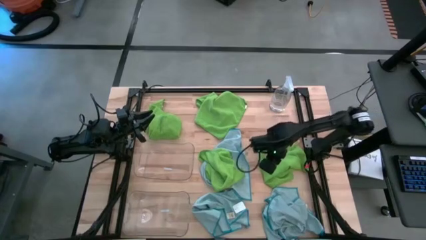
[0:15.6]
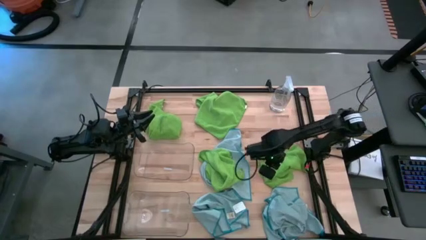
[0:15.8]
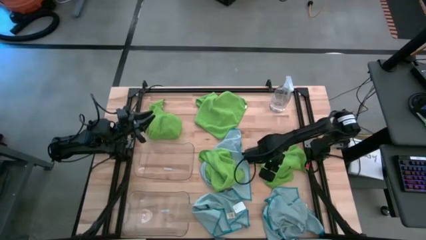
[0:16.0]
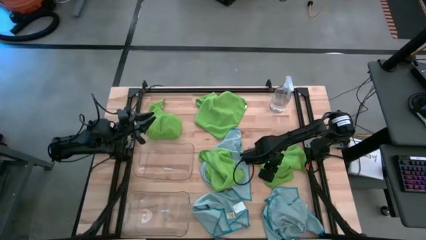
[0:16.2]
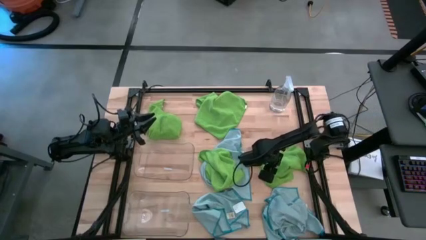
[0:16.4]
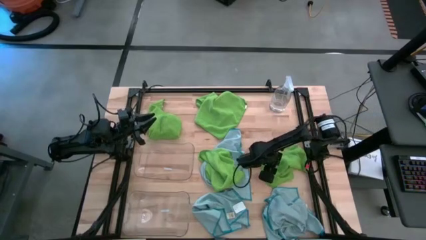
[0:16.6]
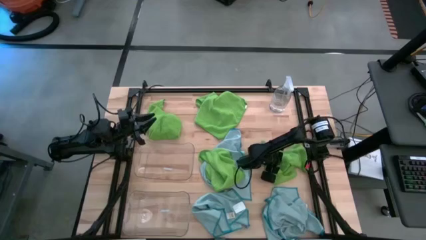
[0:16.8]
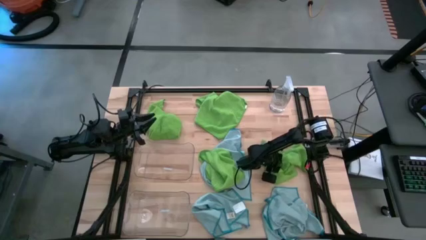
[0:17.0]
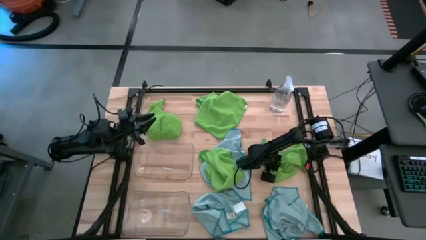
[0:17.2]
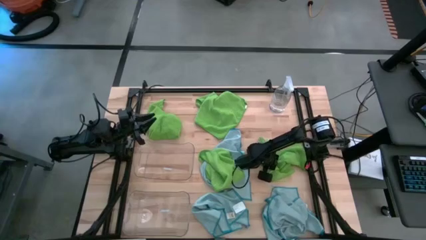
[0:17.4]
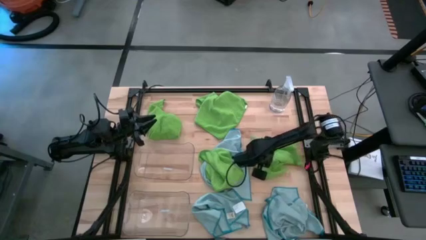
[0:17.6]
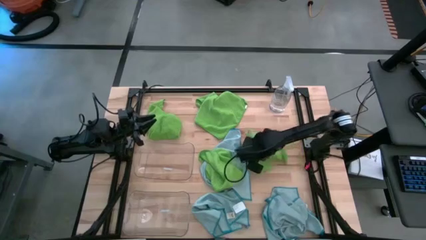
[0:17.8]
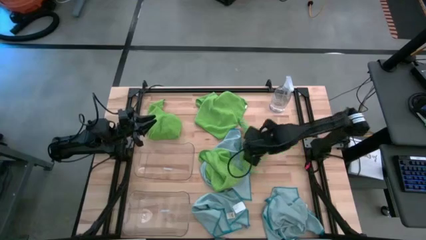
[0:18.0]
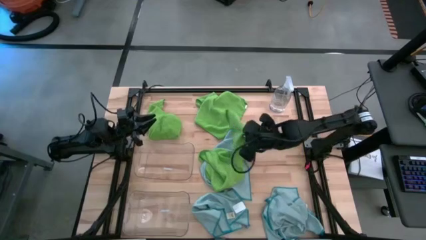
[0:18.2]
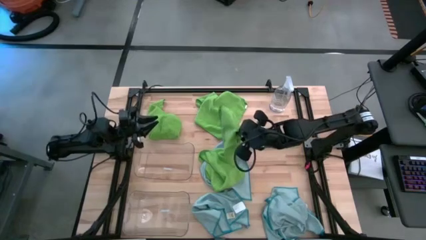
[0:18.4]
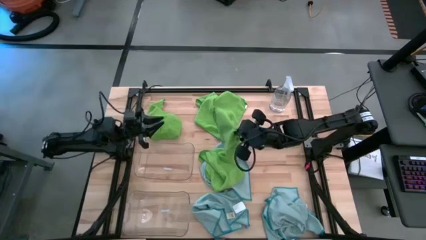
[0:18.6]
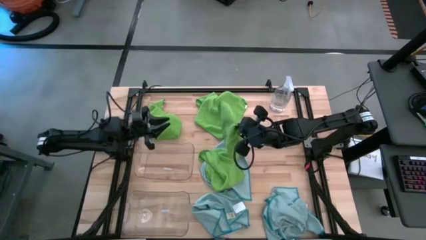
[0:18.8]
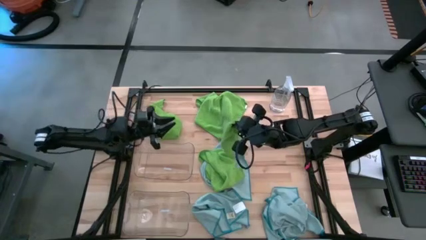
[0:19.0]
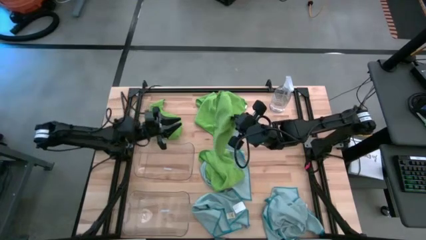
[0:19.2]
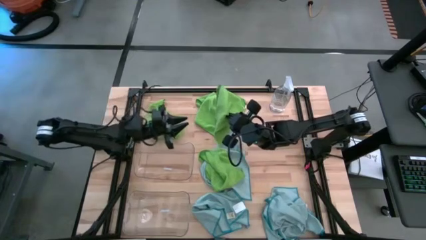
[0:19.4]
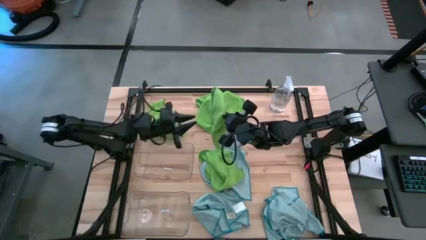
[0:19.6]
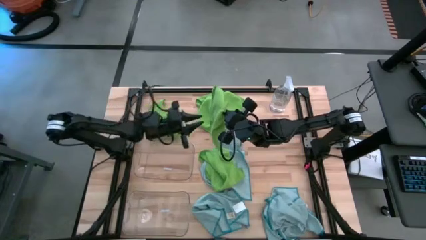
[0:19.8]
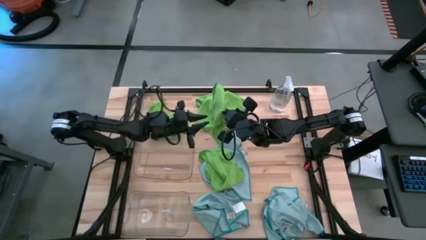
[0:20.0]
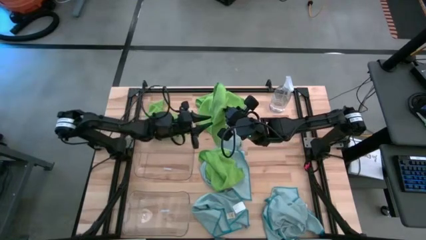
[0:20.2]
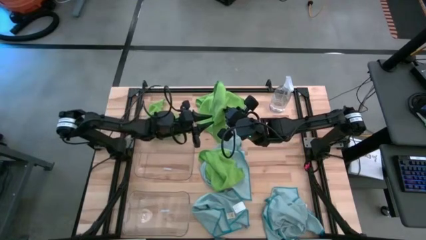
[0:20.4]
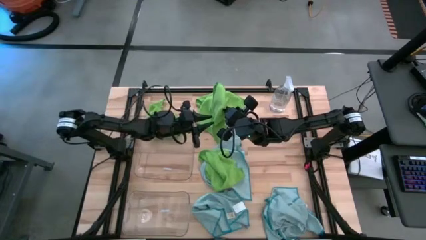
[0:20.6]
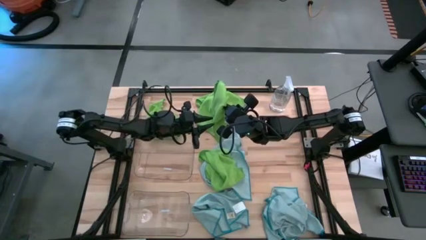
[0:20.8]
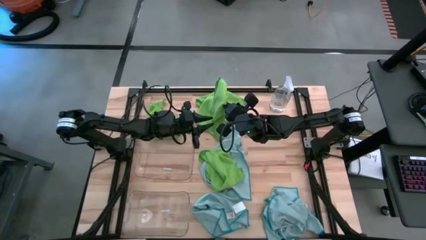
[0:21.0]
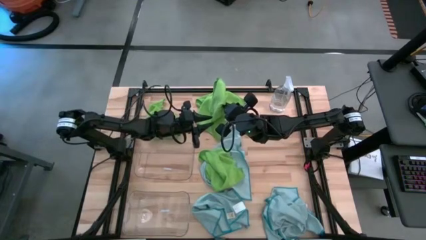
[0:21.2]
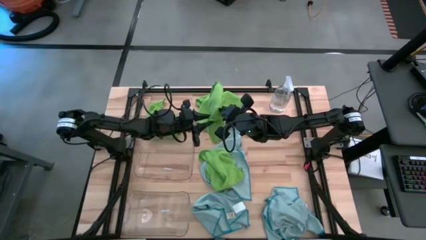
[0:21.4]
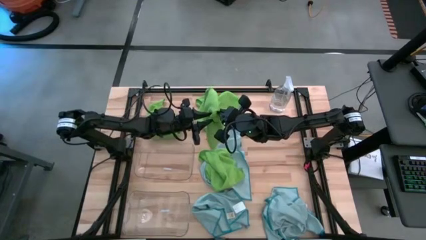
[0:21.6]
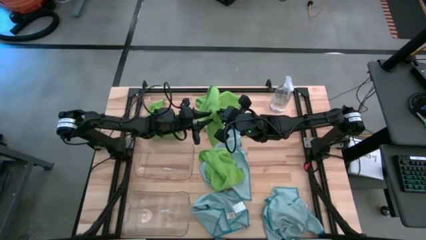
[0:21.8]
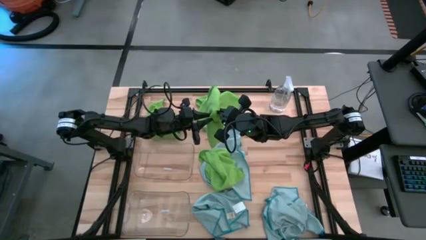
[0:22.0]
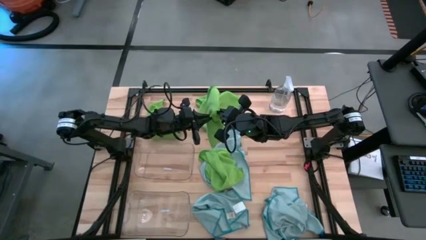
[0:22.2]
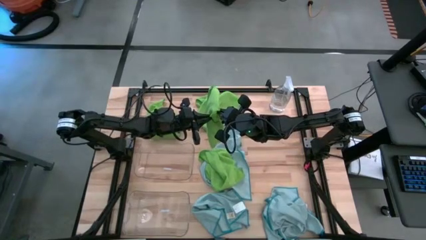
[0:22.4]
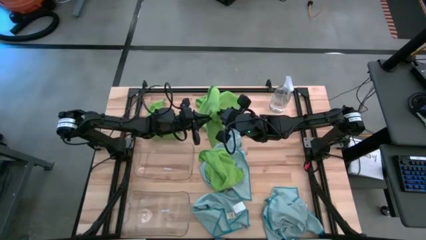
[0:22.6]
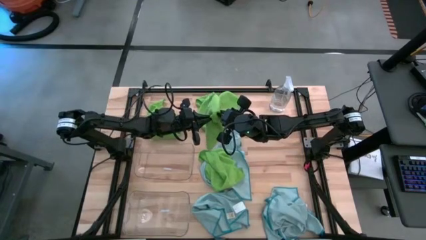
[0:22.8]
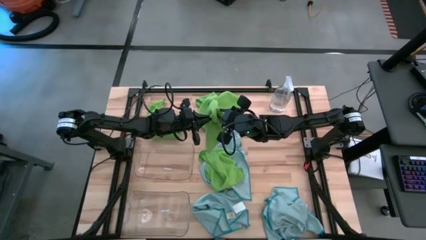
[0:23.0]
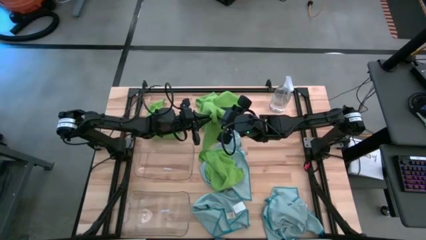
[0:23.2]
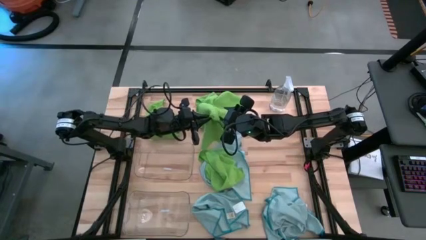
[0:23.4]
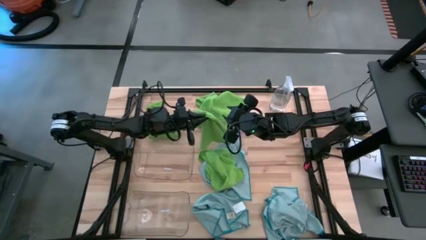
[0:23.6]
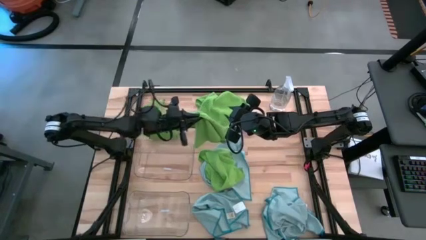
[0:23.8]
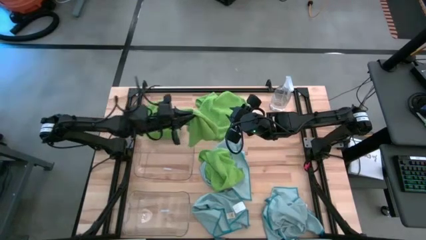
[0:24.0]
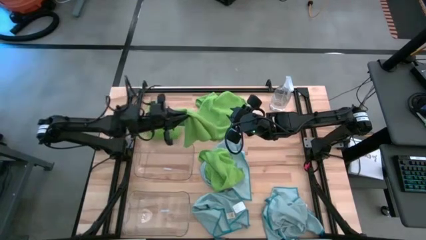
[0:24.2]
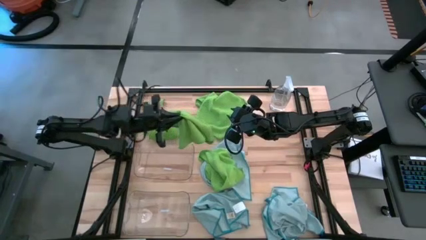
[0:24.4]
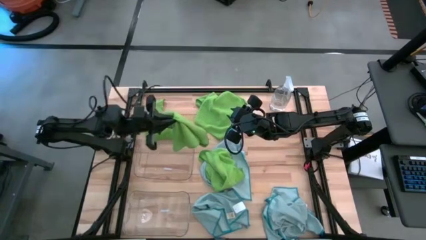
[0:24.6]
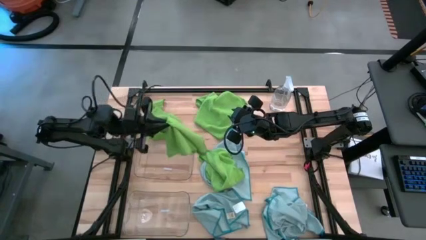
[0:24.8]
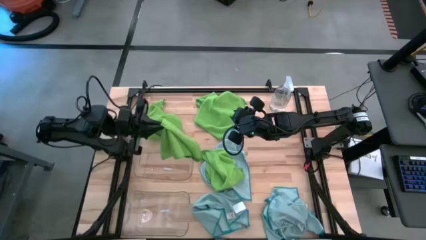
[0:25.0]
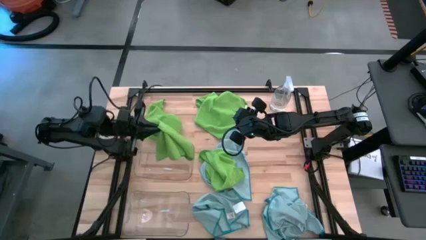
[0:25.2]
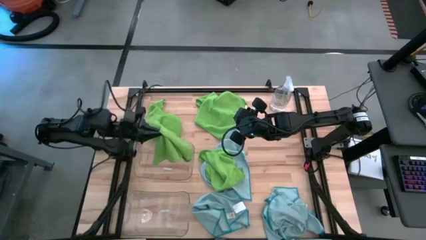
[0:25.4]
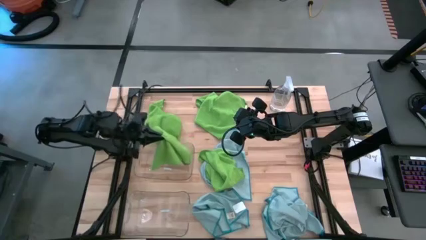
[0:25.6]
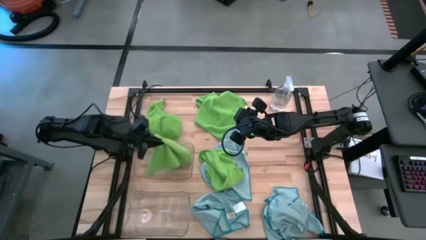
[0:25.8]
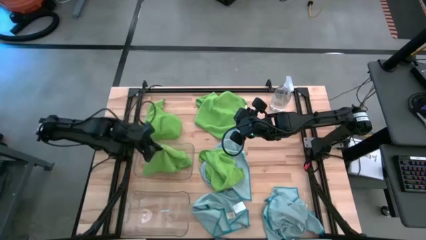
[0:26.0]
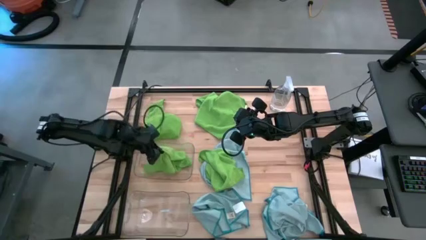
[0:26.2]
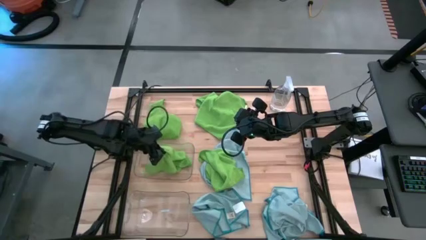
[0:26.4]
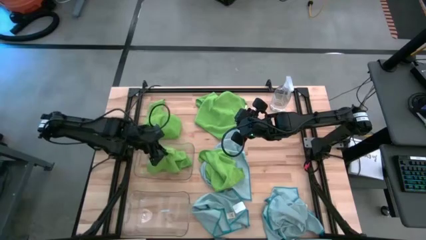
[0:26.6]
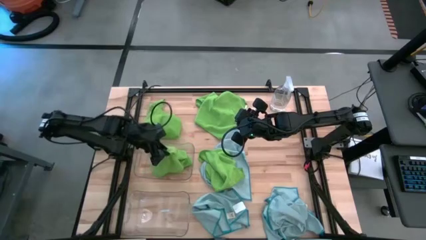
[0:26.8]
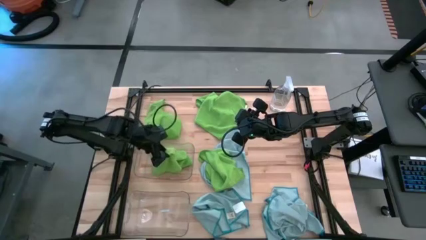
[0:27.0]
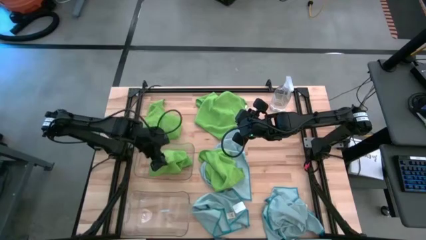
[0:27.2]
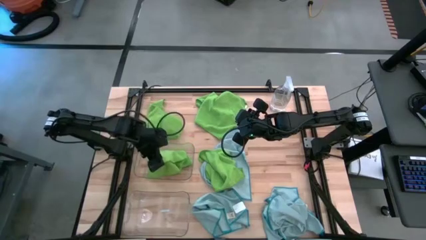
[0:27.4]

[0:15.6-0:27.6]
Task: Sort microfiber towel by color & place in baskets
Put the bottom right green microfiber cloth into the top transparent bin
